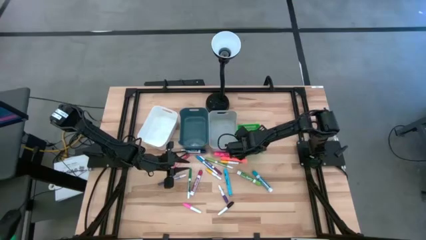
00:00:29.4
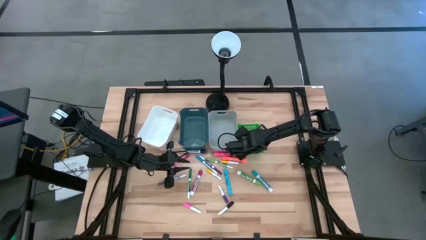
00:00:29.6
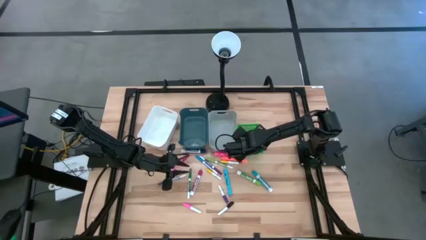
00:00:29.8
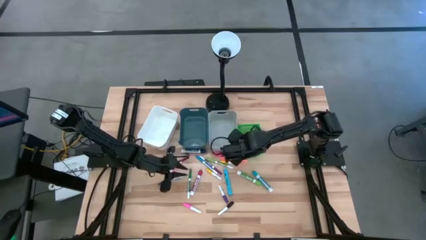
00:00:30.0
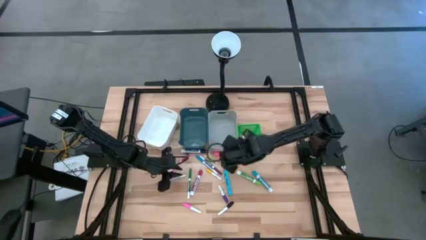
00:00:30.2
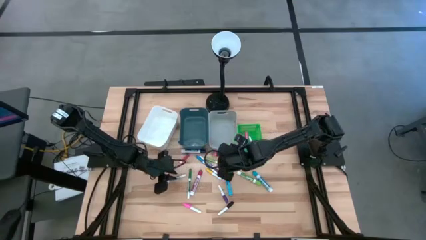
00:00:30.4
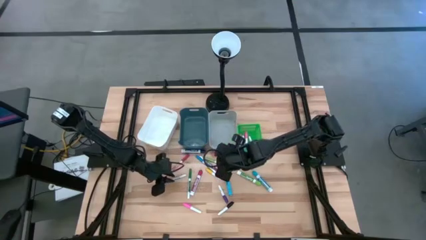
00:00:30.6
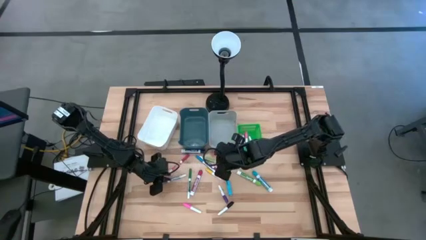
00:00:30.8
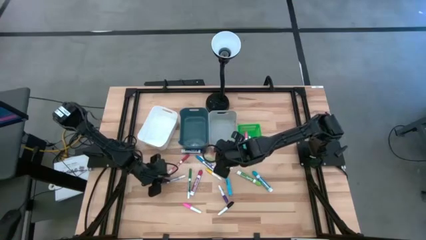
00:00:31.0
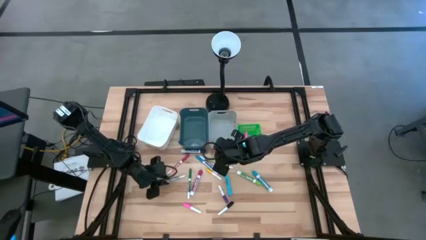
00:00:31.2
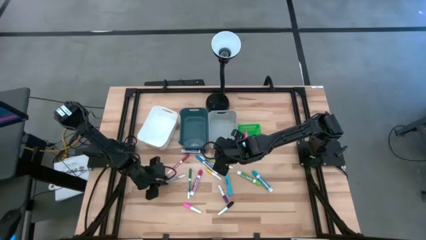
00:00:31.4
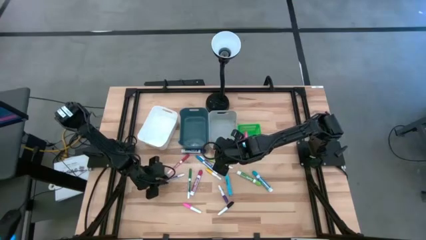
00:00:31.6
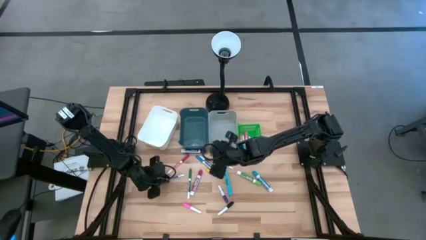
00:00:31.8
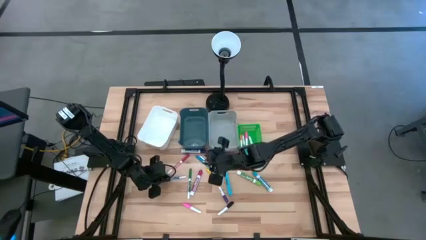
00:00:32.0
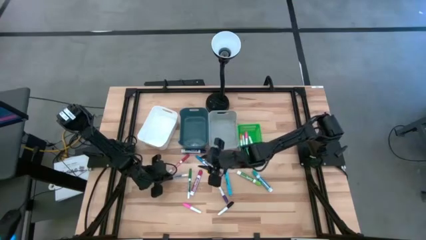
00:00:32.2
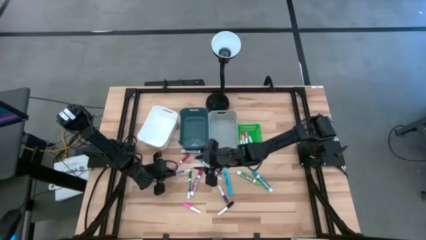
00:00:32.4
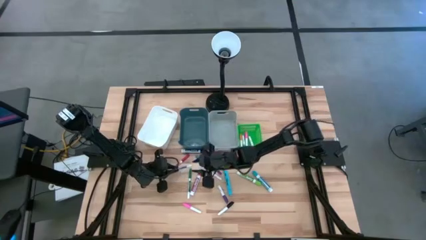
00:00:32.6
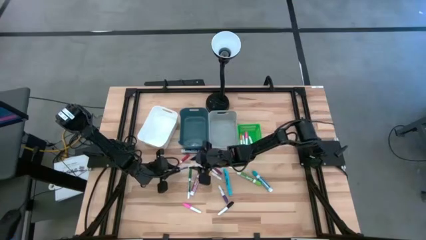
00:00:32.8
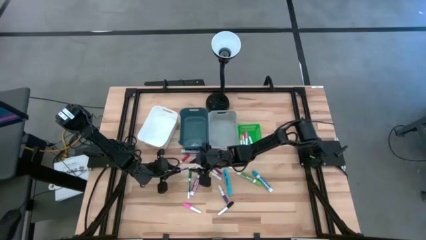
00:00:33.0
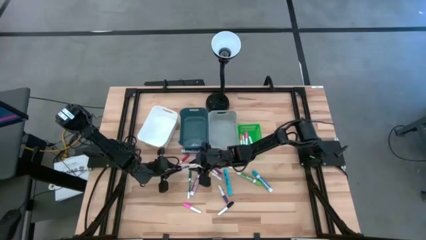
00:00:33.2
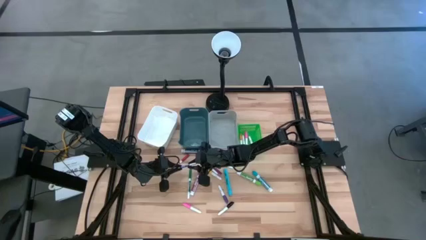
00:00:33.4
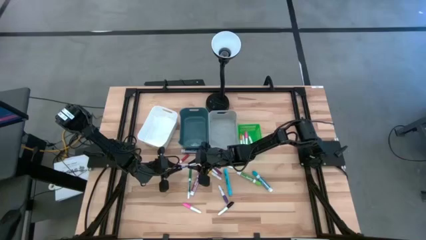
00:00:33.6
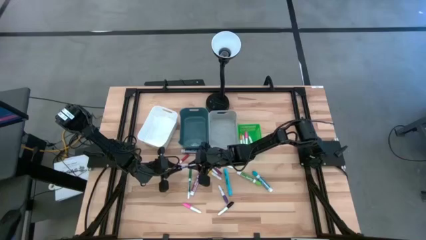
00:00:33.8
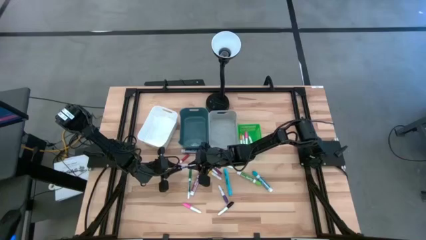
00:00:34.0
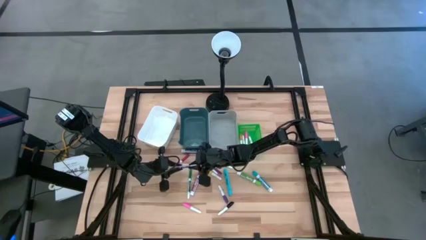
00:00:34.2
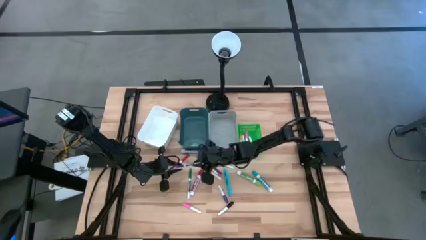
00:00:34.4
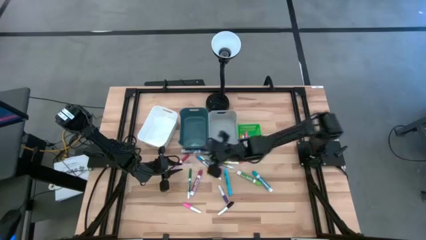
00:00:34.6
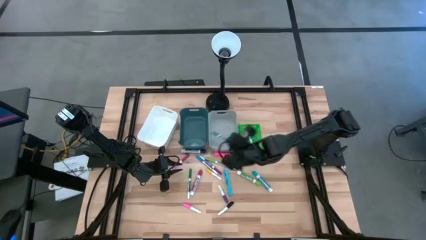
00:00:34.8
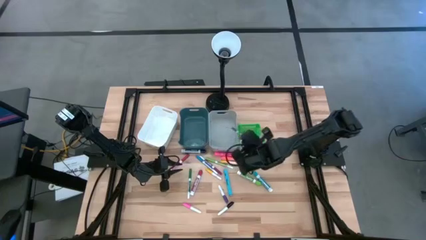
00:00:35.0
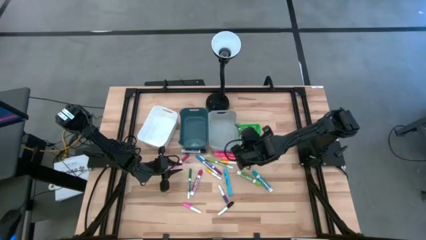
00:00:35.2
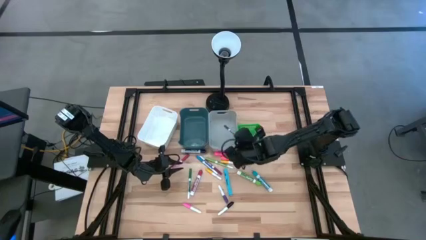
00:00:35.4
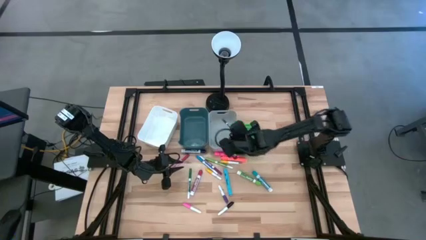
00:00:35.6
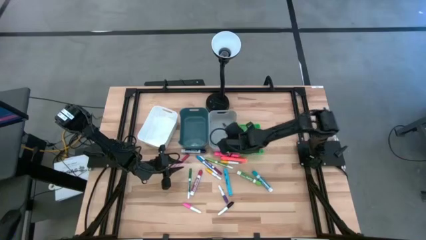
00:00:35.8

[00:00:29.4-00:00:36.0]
Task: Pick & Place Markers
Put the small dark blue marker pen into the gray bin

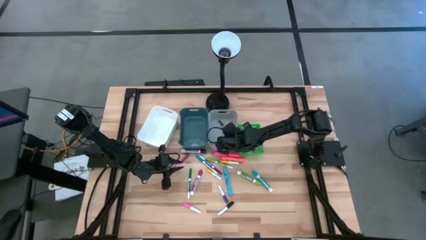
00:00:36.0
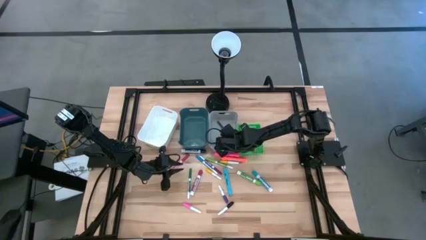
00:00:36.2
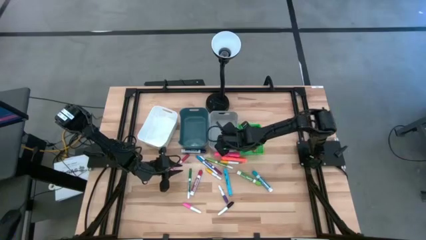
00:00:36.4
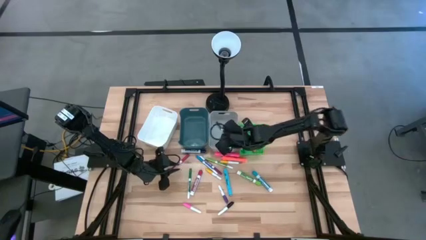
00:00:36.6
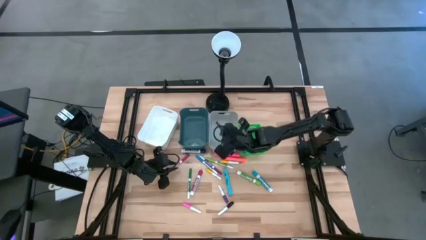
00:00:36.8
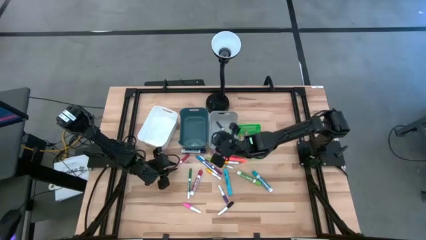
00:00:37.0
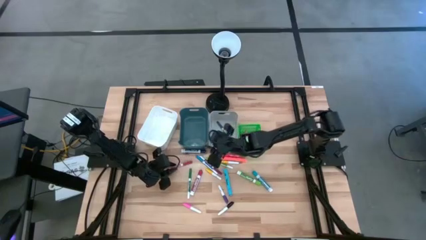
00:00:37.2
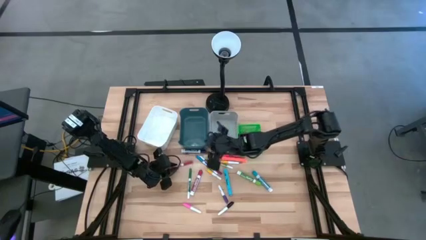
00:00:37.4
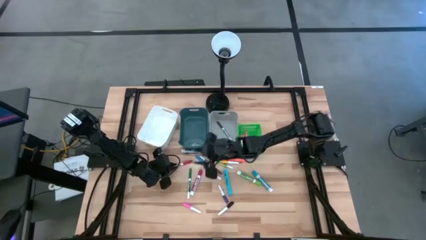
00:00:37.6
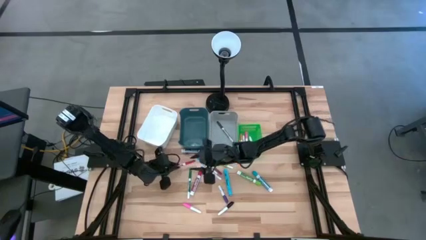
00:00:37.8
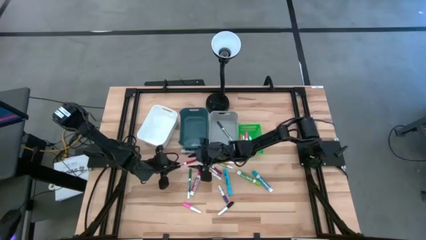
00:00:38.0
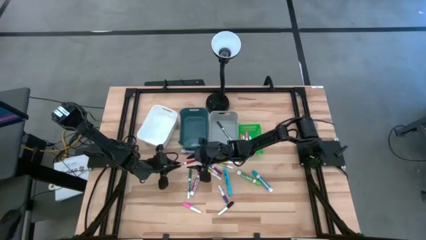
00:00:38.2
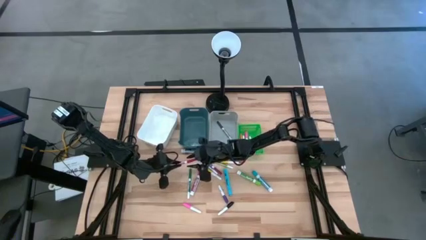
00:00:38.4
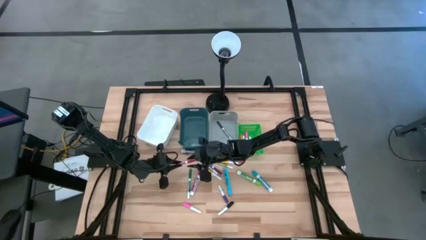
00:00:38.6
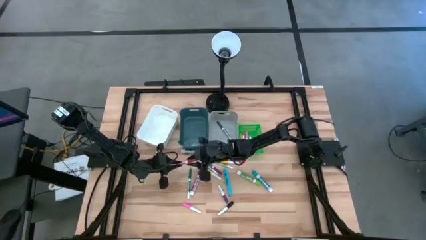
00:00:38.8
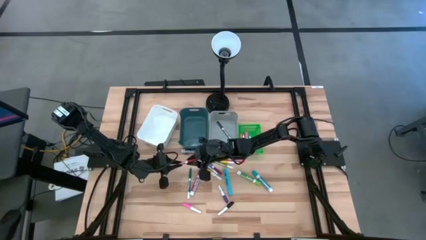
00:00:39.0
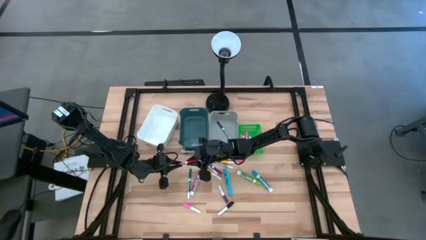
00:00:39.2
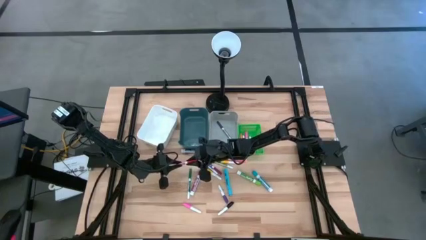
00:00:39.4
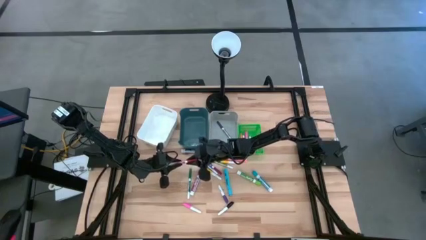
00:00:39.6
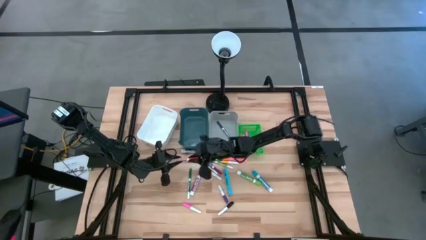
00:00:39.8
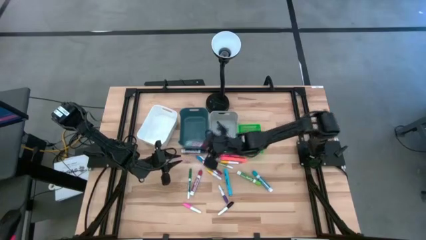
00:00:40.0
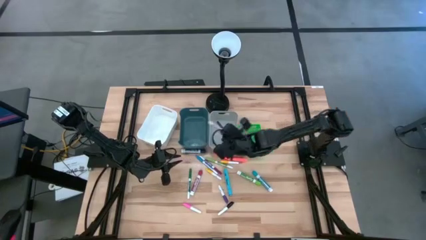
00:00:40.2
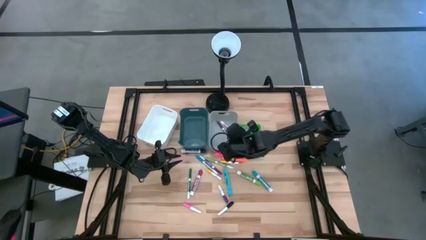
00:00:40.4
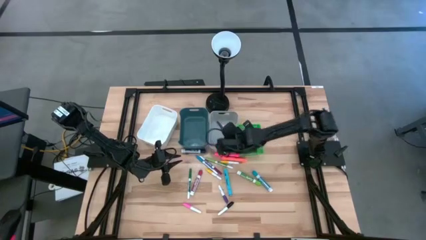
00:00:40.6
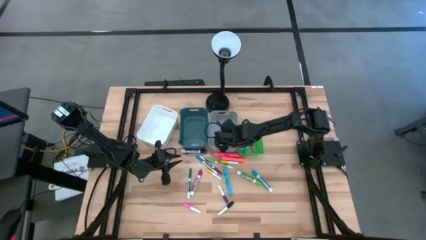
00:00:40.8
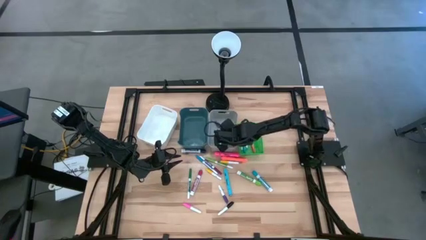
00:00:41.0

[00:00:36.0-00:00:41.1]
Put the small red marker pen into the gray bin

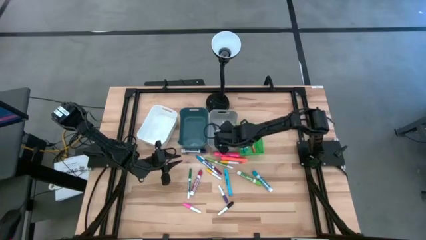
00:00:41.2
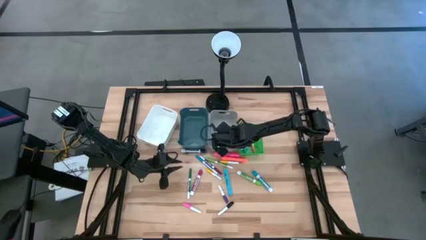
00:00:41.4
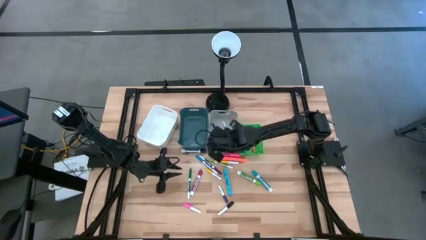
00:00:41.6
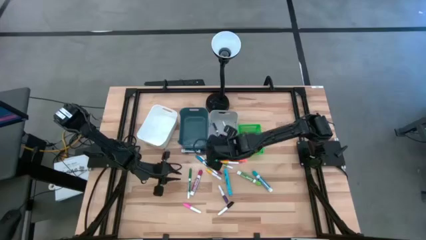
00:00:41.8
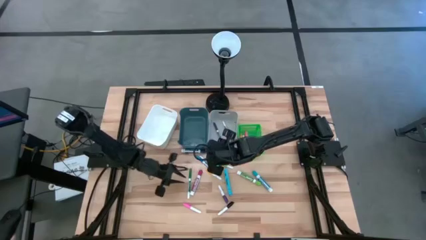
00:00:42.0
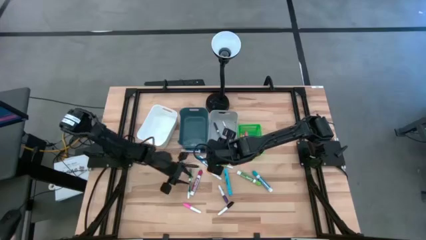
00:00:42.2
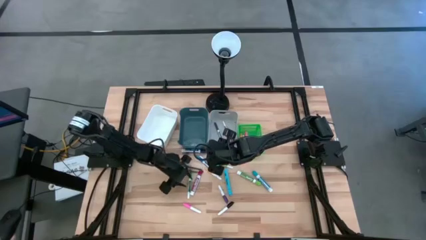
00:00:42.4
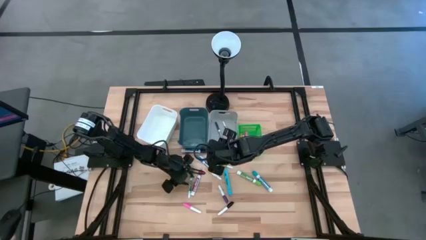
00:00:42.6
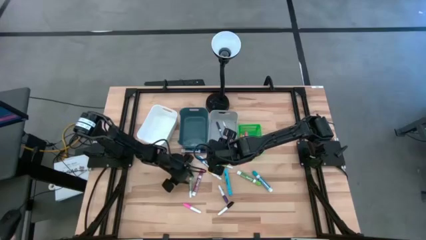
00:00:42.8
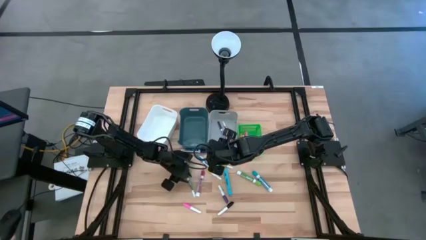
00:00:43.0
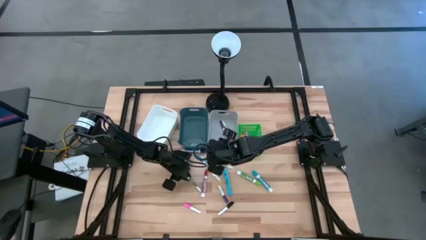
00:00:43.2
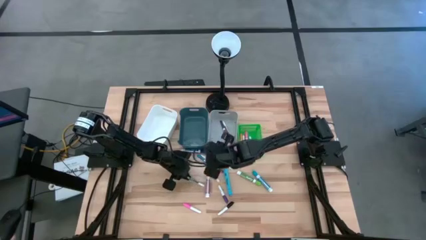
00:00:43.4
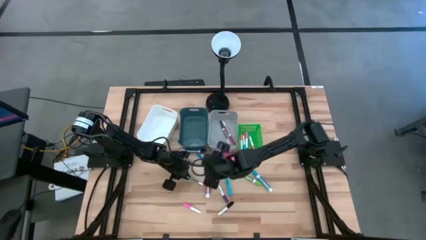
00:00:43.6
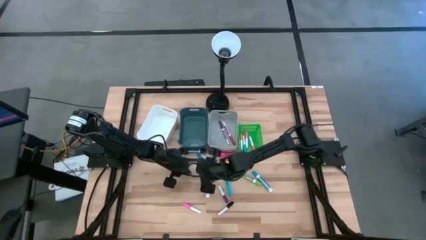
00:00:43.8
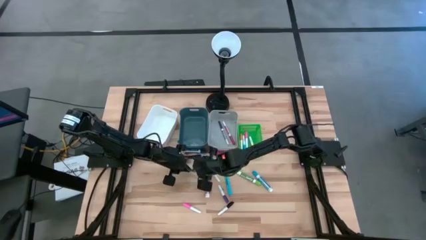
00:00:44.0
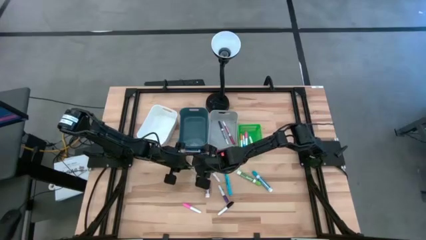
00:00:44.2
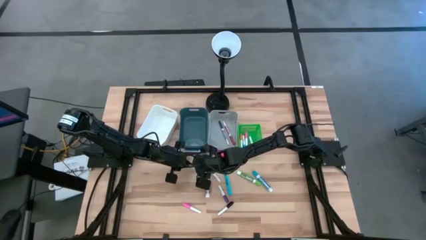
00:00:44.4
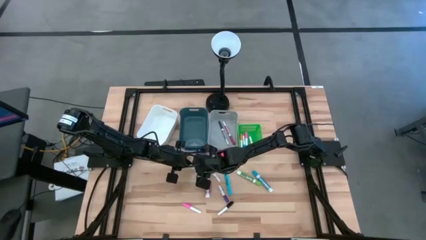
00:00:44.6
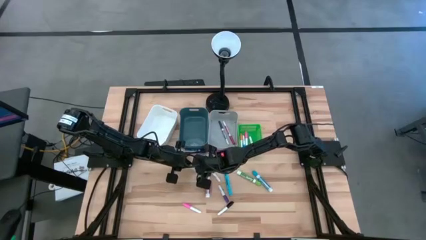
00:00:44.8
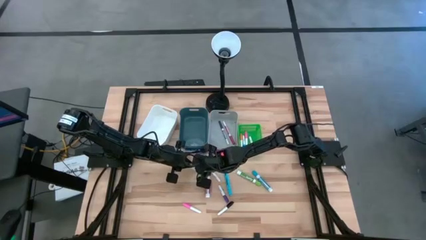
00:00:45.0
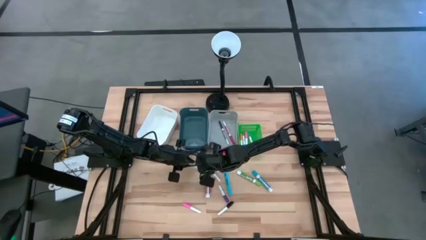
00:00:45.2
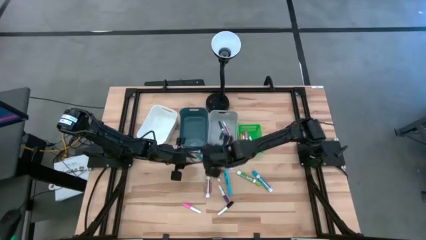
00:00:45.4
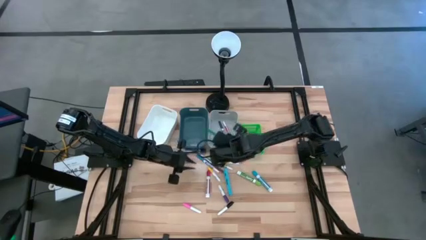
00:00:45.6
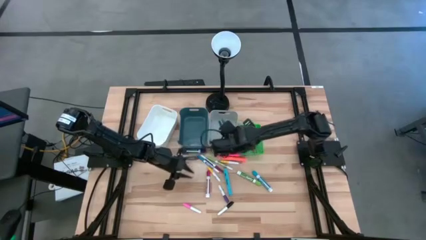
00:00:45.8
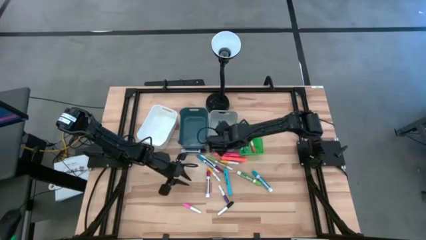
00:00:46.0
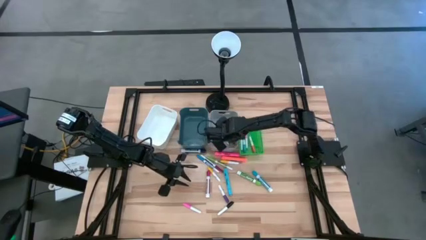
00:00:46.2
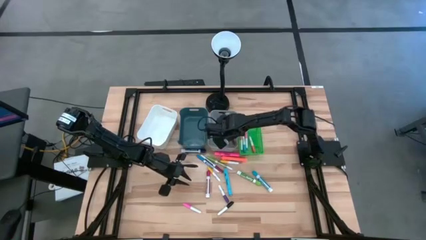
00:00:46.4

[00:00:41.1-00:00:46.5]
Put the small green marker pen into the gray bin

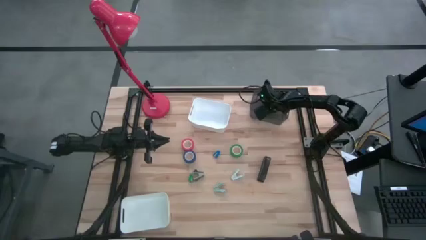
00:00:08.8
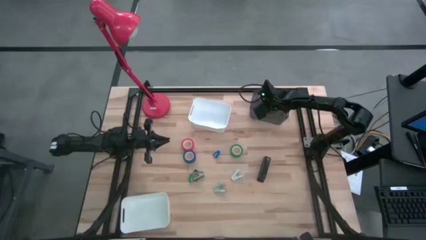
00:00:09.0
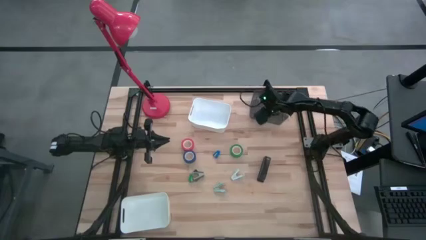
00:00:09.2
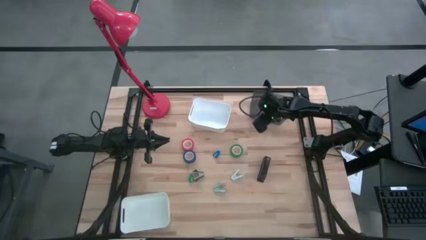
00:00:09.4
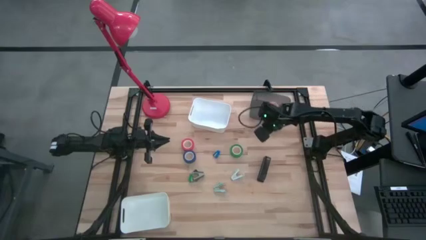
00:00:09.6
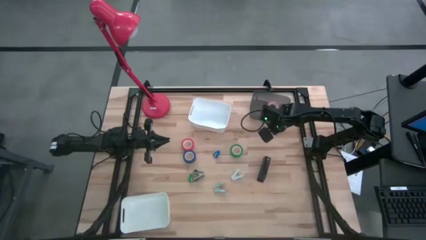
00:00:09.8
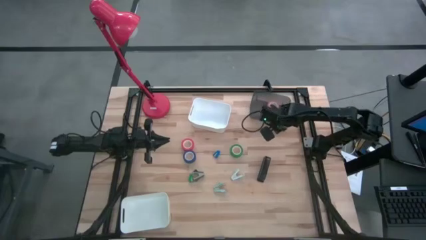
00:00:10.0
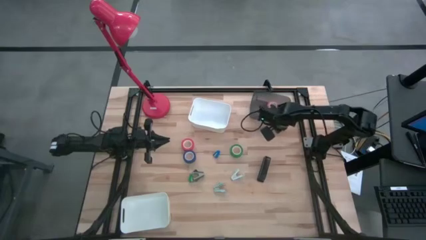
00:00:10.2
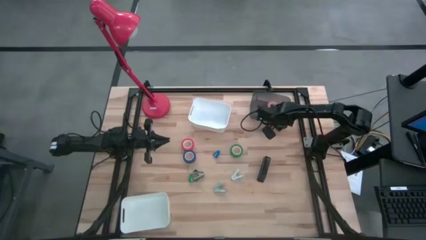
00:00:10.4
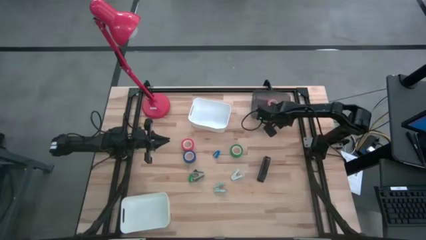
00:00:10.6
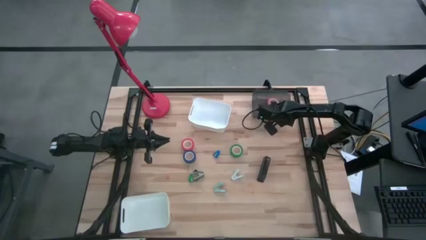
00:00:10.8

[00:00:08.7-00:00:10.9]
Task: Pick and place Stapler, Stapler remover, tape
Adjust the gray bin
